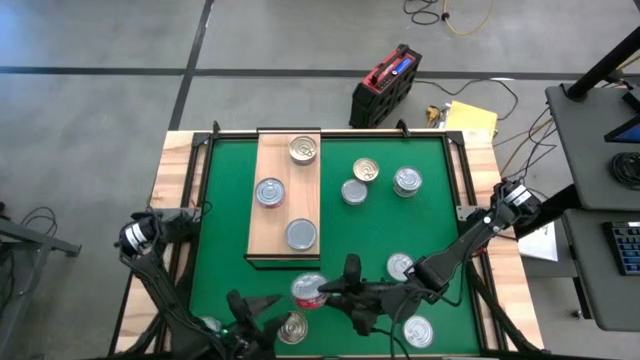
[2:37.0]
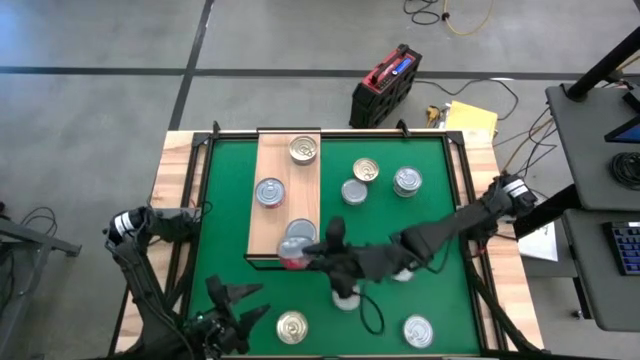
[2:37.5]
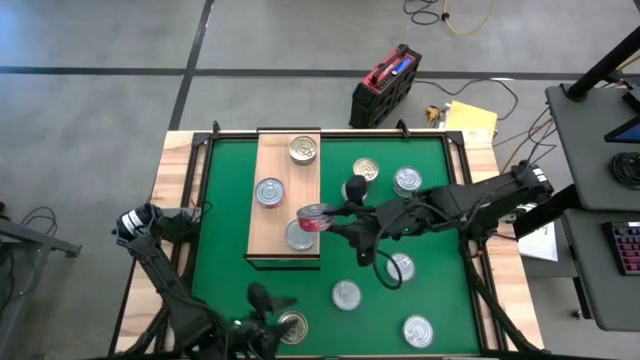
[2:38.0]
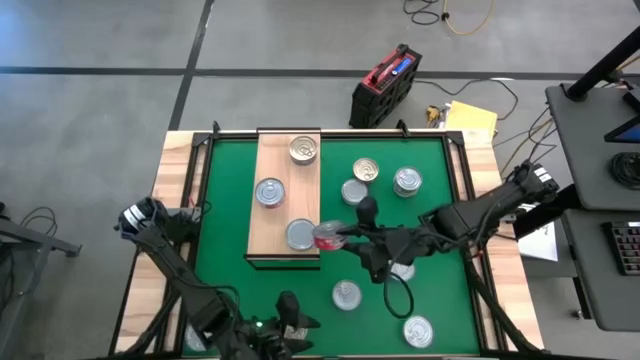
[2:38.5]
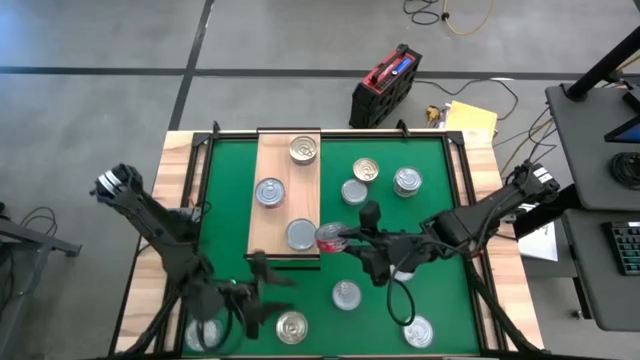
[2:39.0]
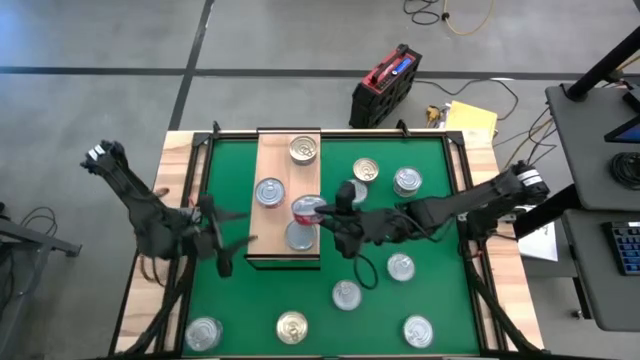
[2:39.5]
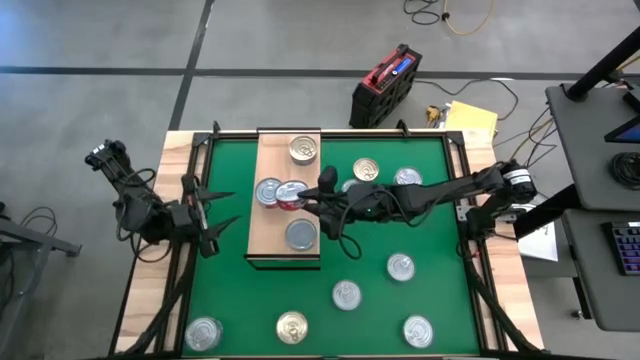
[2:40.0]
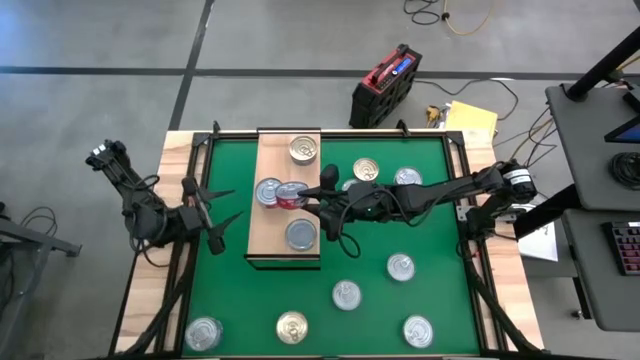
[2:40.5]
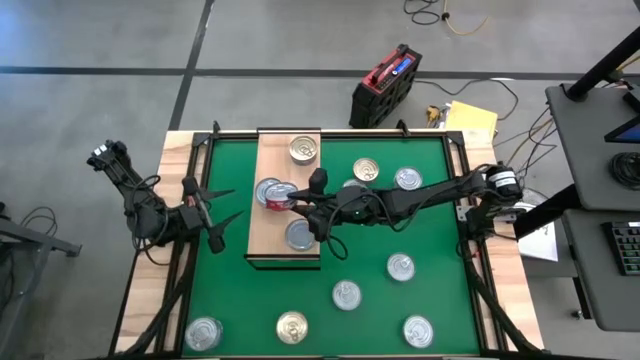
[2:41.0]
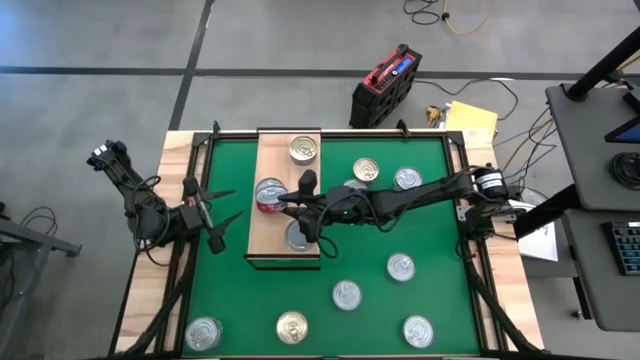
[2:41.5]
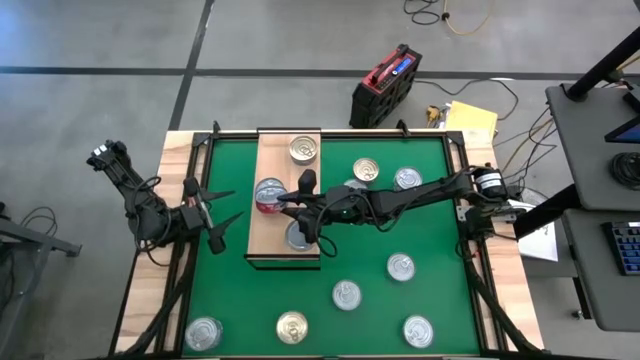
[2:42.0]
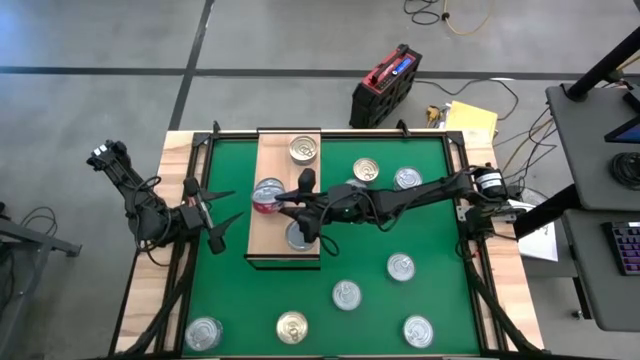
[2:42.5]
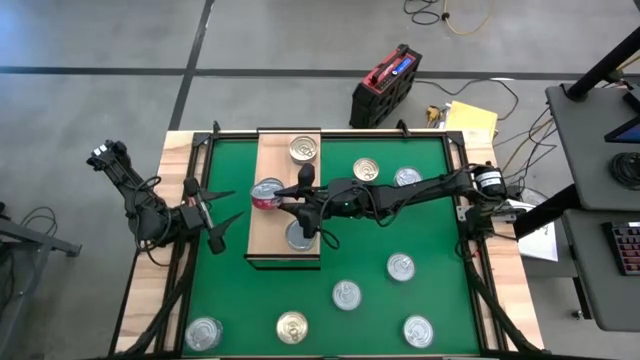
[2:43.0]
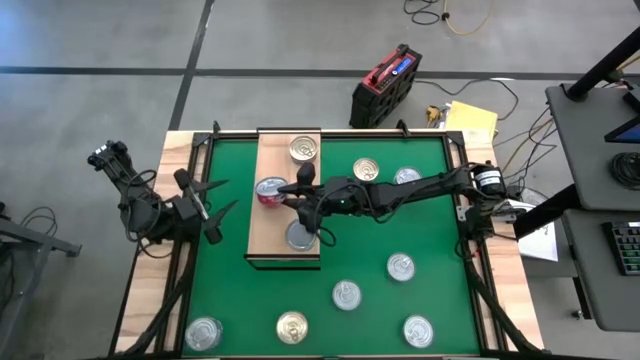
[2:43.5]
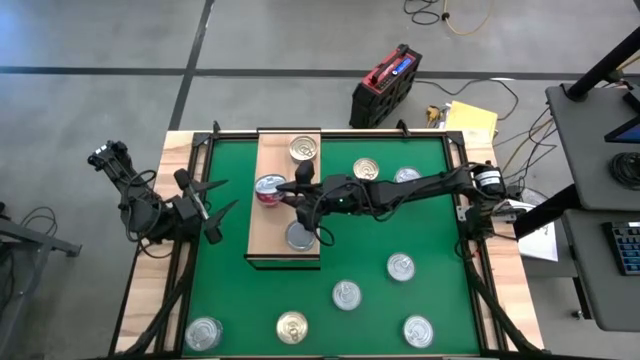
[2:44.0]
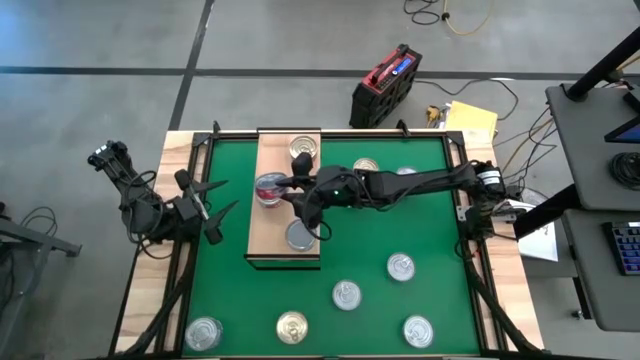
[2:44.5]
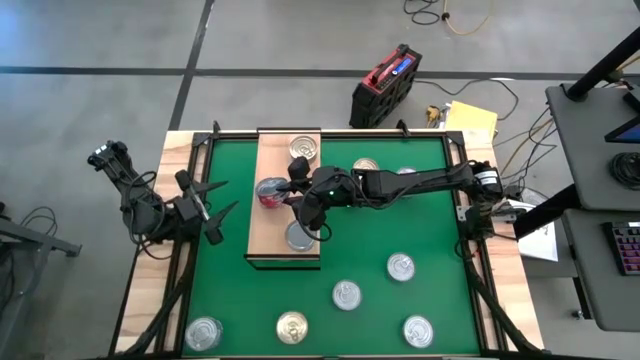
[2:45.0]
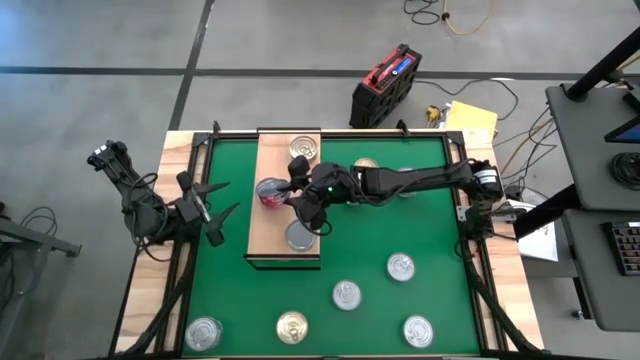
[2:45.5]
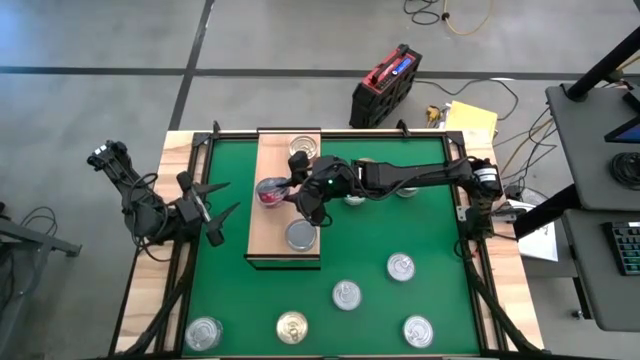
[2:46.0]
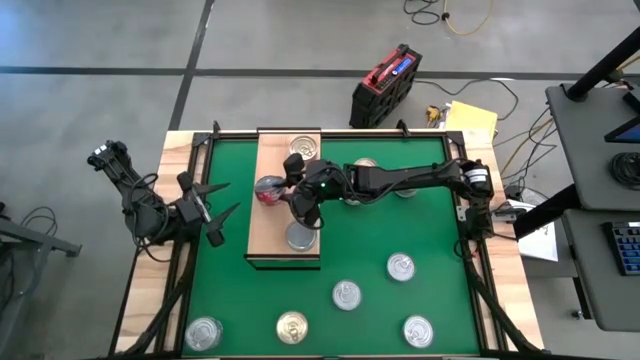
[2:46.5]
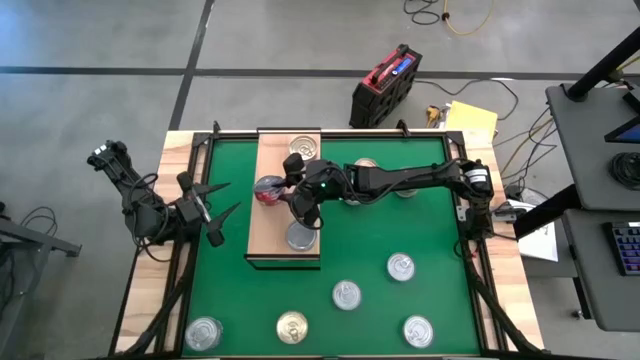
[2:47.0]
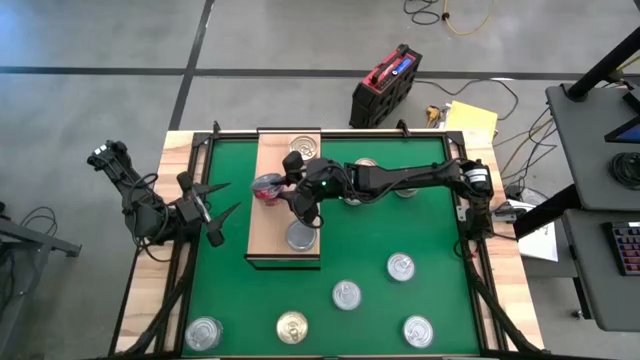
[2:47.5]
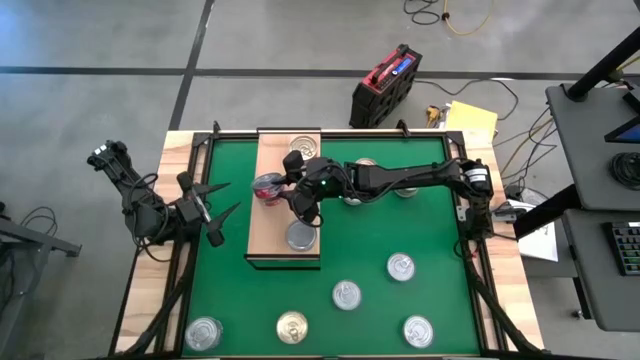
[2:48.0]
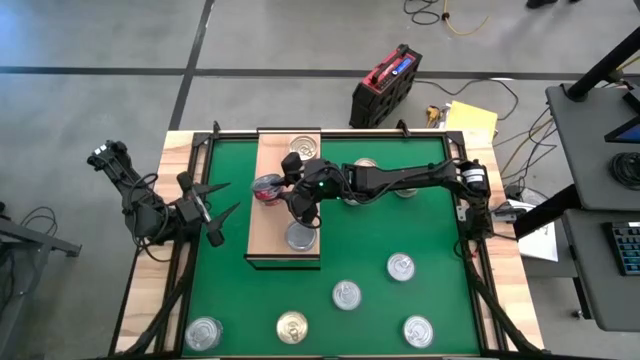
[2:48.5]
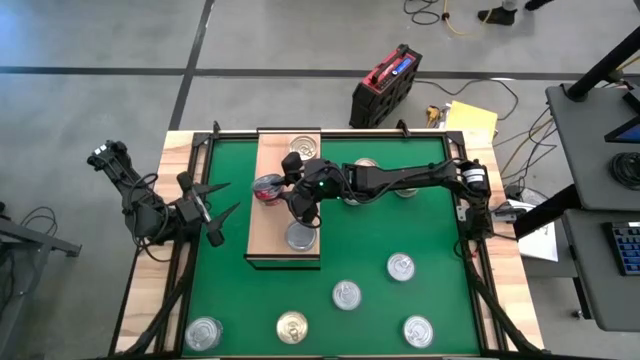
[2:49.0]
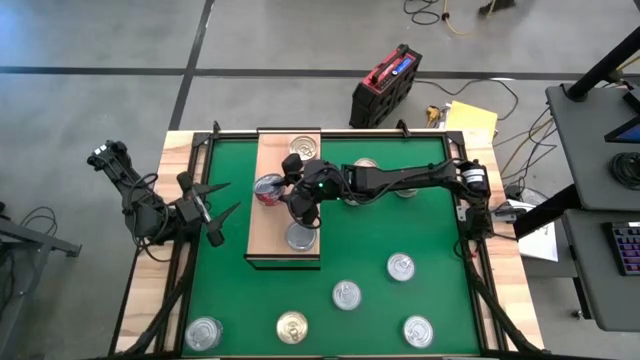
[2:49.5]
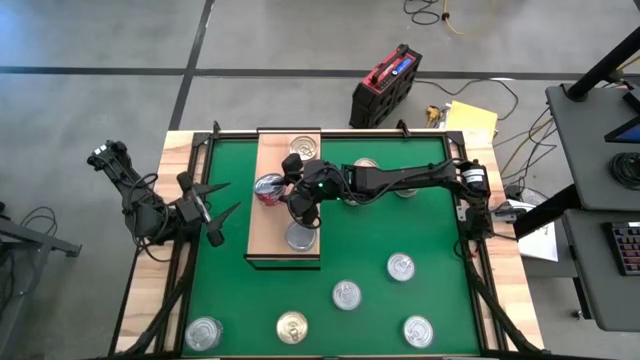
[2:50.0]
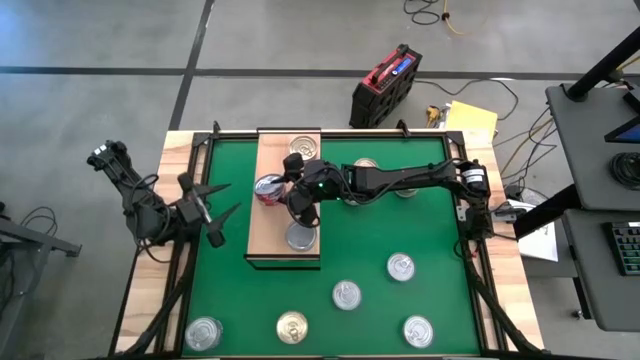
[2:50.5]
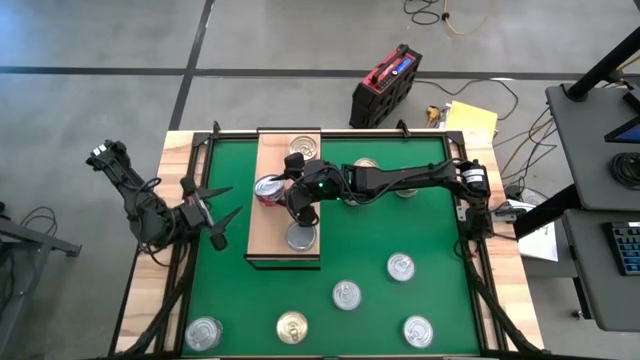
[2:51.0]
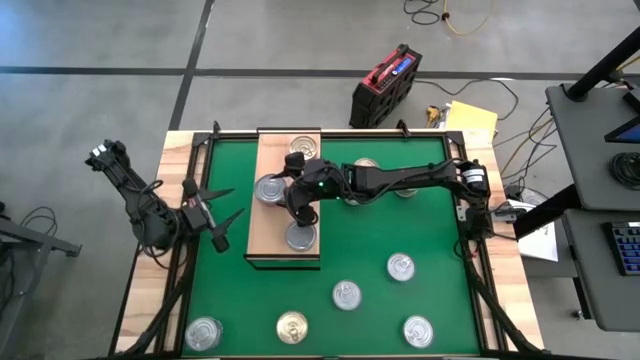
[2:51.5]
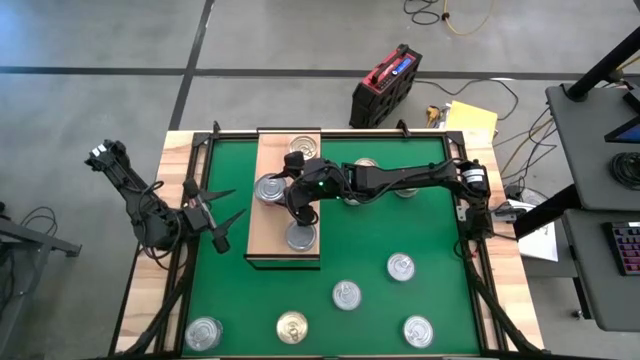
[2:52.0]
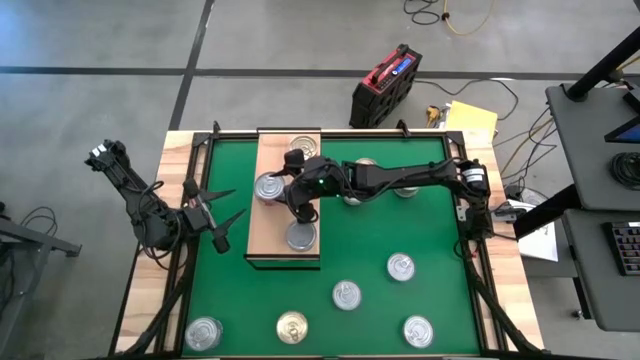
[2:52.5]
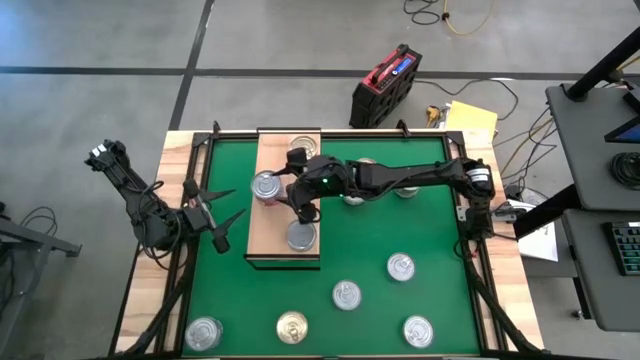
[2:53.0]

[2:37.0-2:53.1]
Task: Stack canned seafood by type on shelf
Stack the red tuna can on top of the red tuna can on the shelf

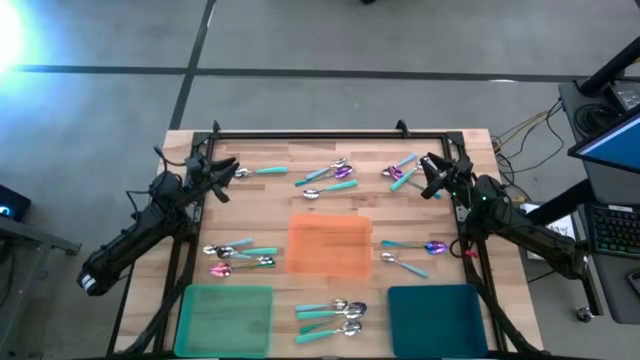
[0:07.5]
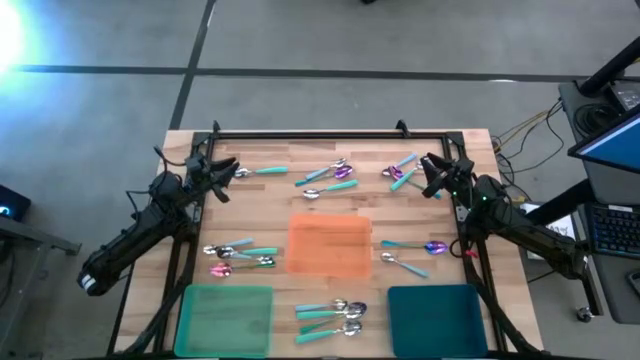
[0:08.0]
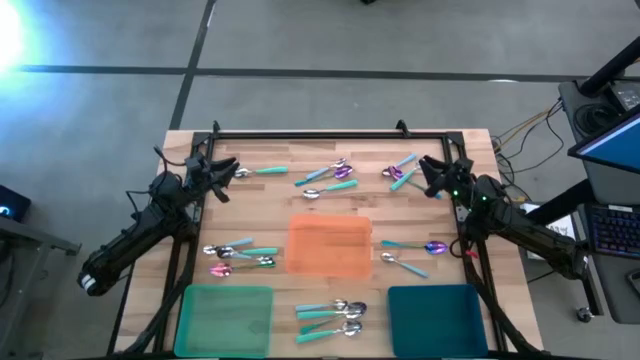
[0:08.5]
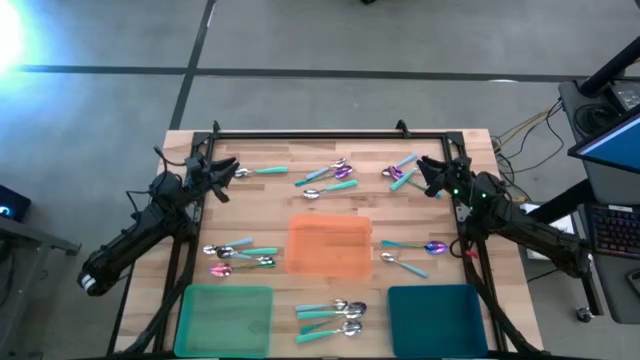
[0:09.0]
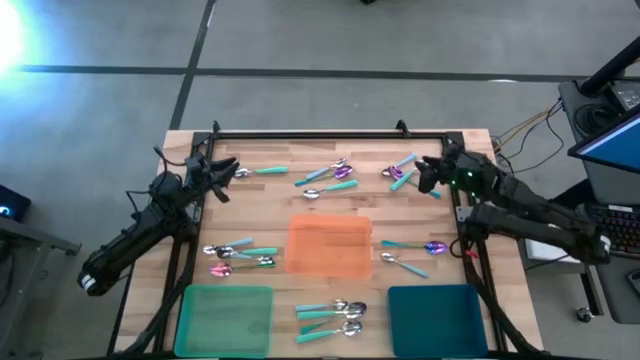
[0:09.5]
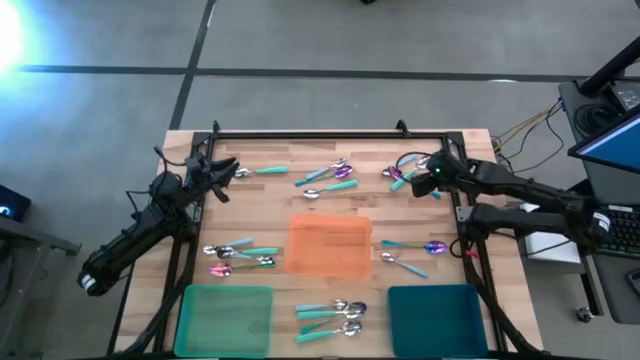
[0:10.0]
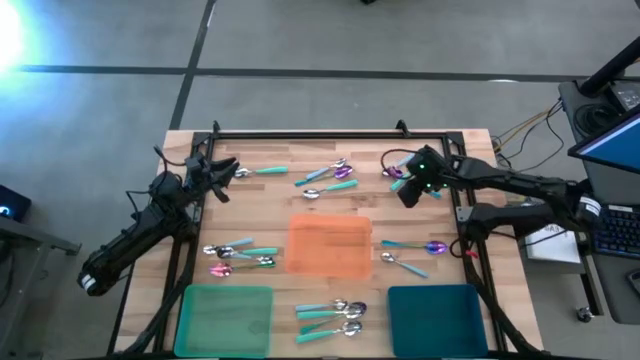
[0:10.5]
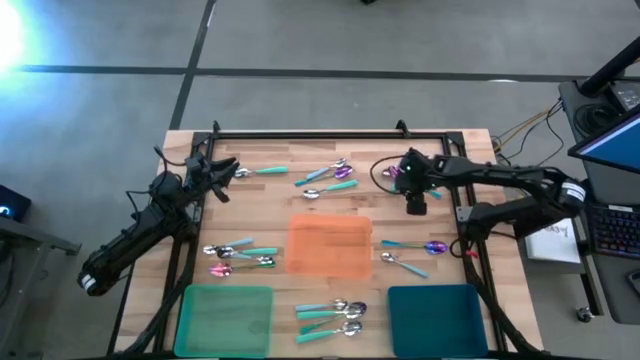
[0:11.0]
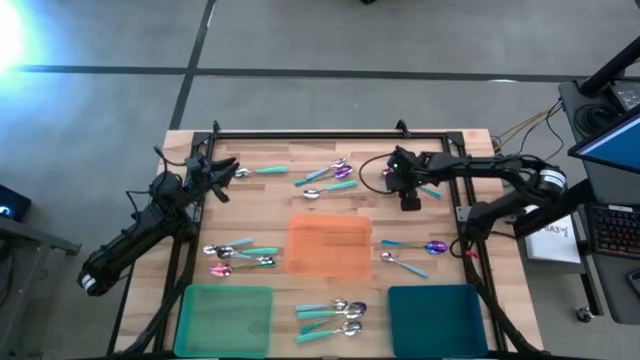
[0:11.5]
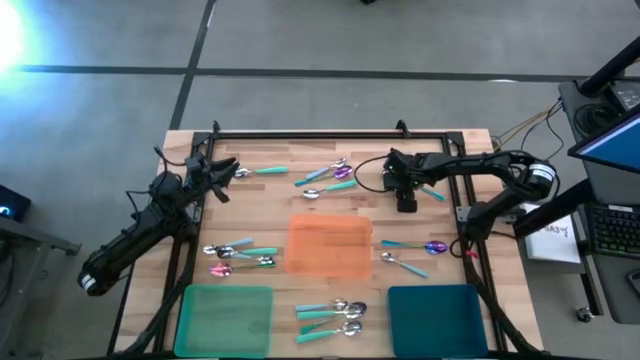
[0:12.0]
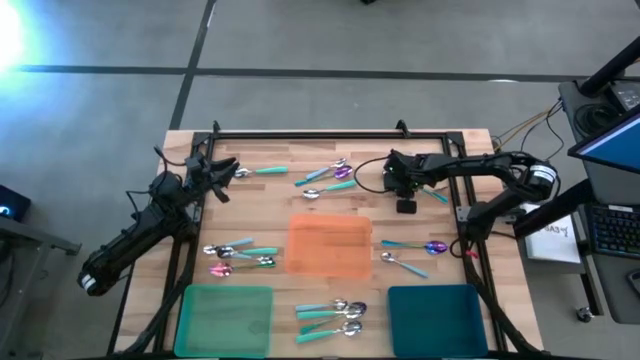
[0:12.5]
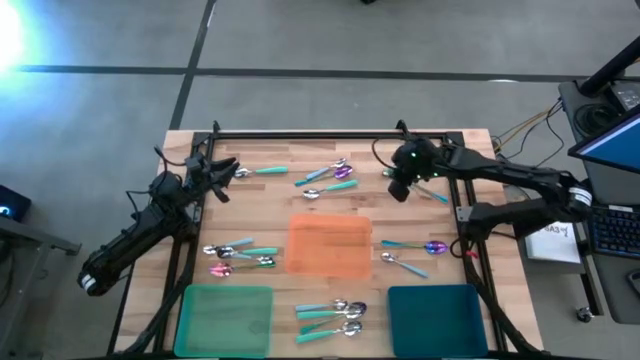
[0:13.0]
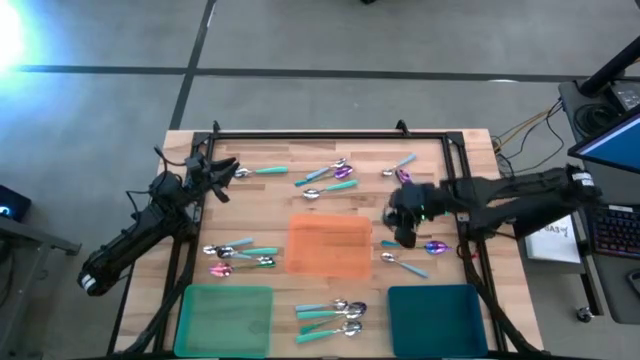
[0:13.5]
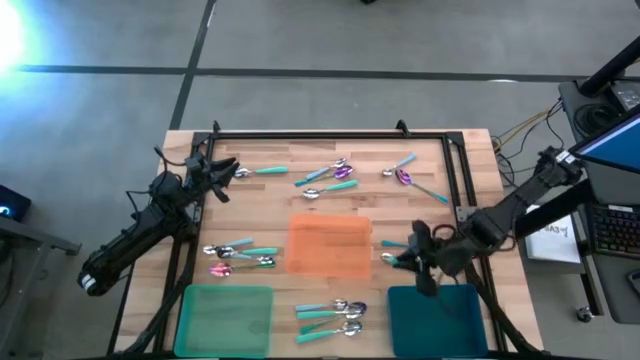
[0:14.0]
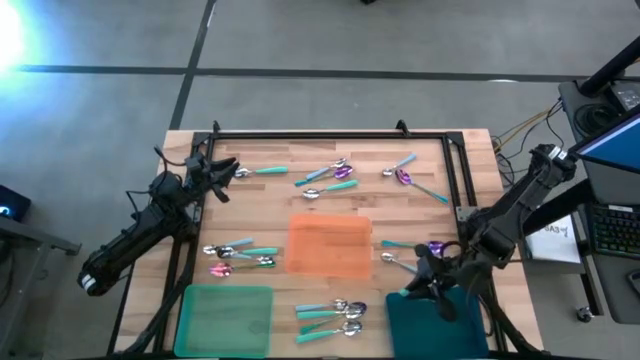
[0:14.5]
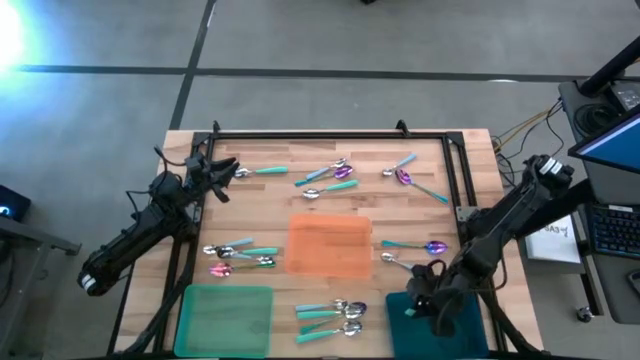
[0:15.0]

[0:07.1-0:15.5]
Task: Sort silverware by color (type)
Put the green spoon into the blue bin
